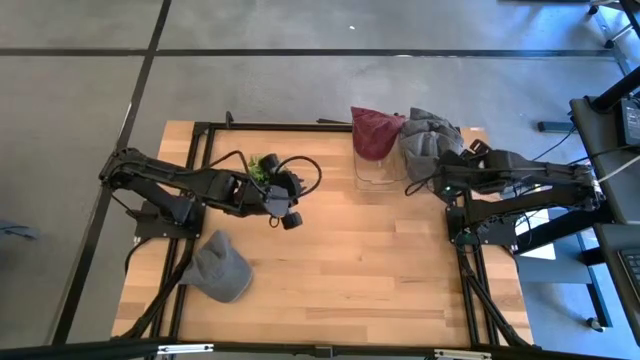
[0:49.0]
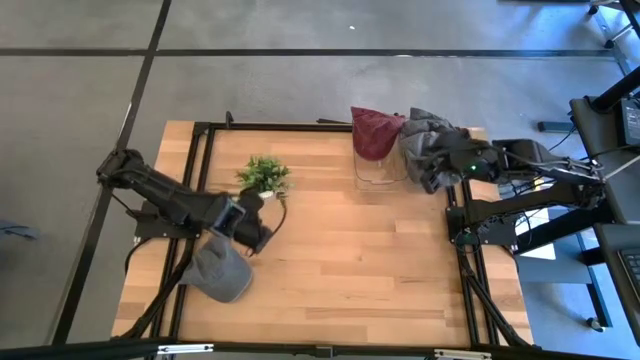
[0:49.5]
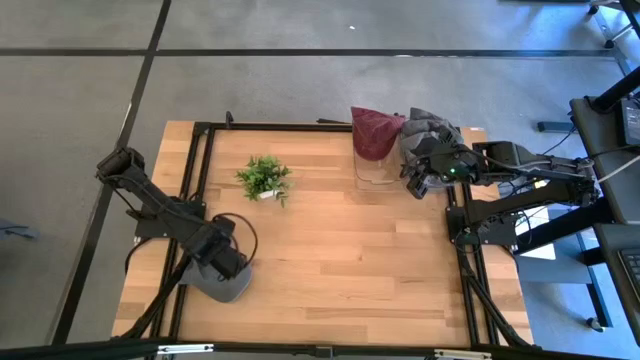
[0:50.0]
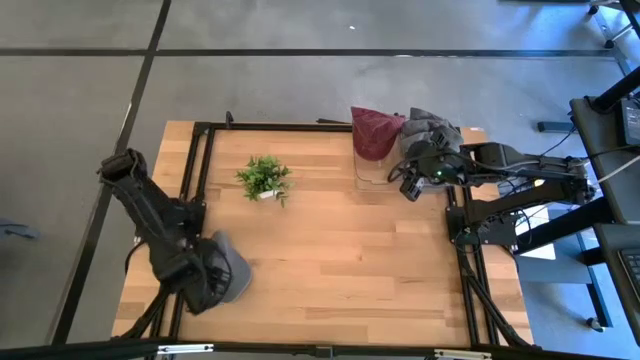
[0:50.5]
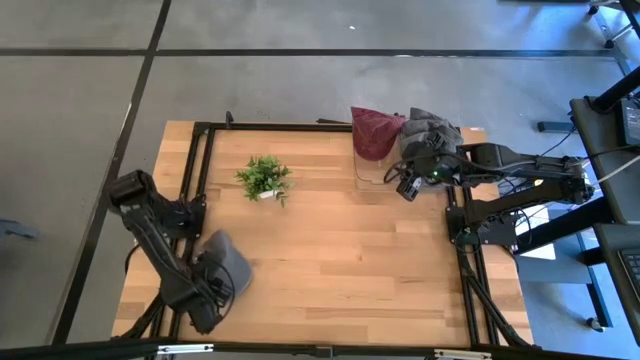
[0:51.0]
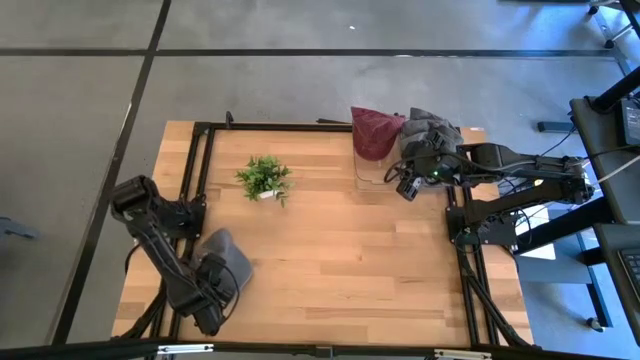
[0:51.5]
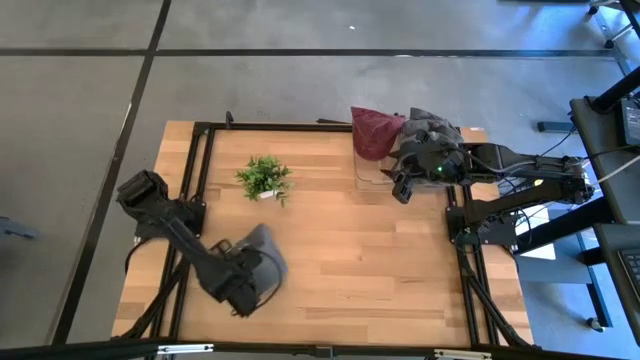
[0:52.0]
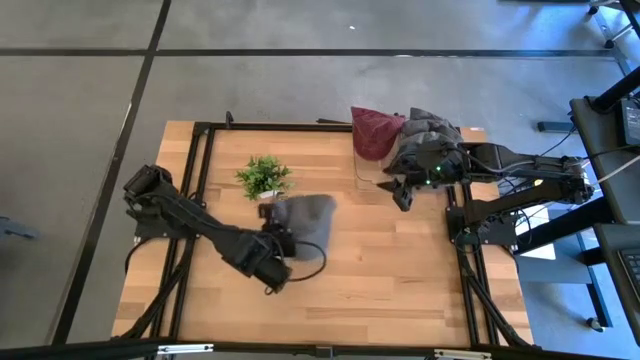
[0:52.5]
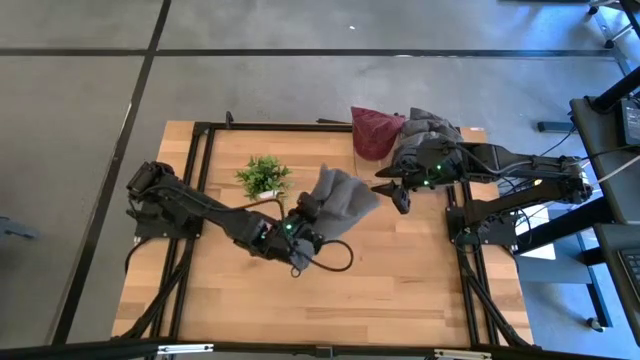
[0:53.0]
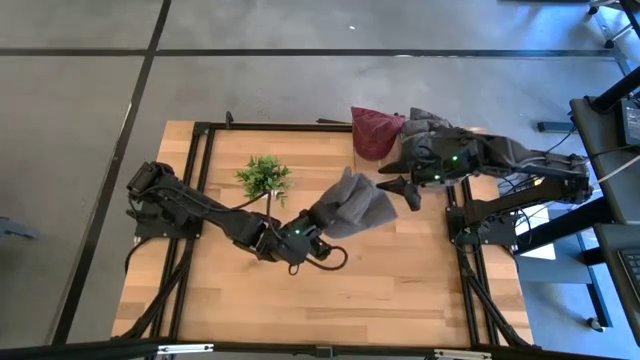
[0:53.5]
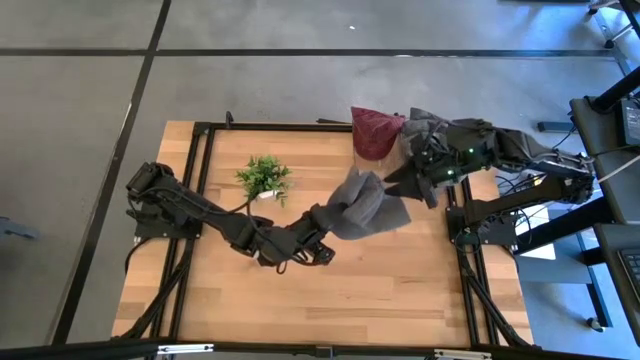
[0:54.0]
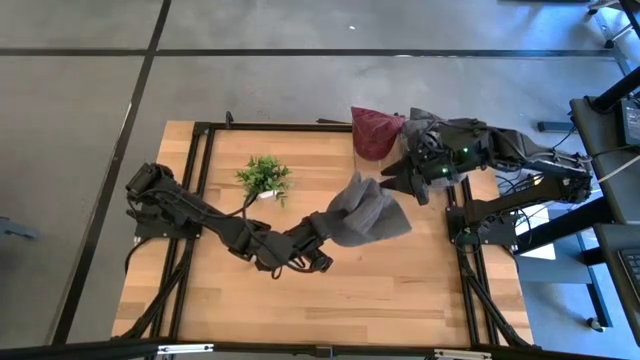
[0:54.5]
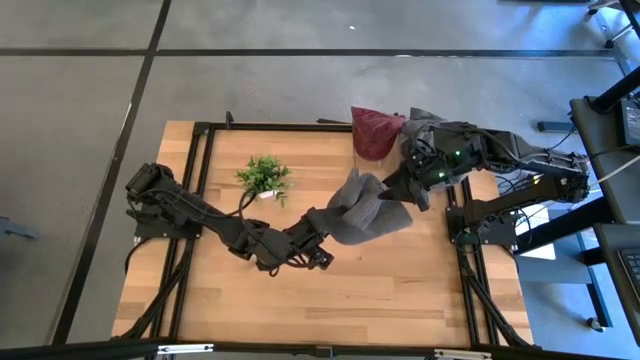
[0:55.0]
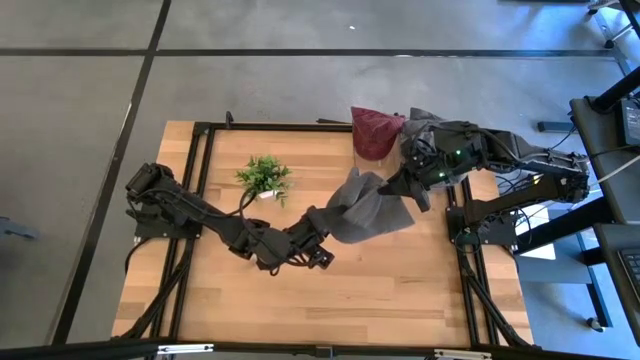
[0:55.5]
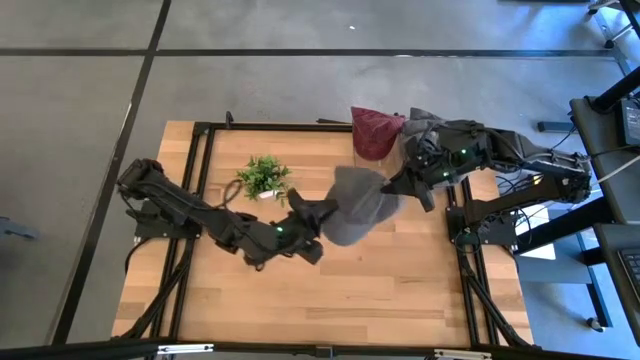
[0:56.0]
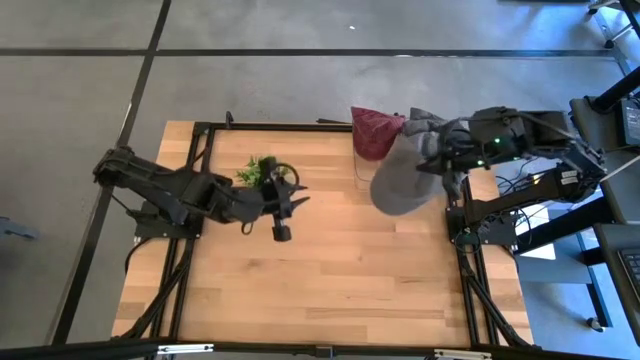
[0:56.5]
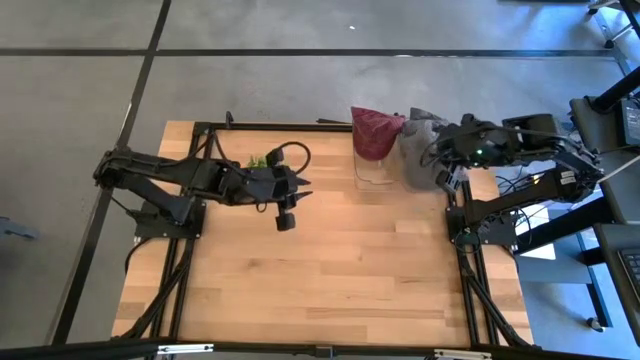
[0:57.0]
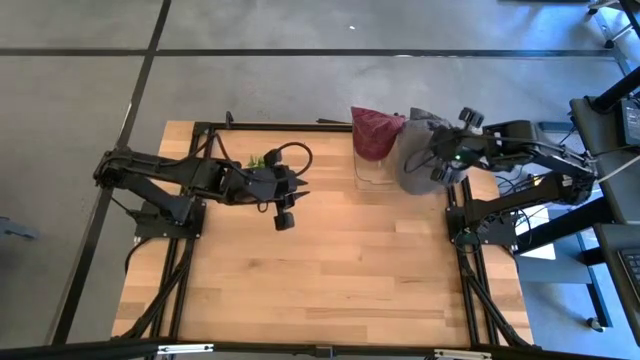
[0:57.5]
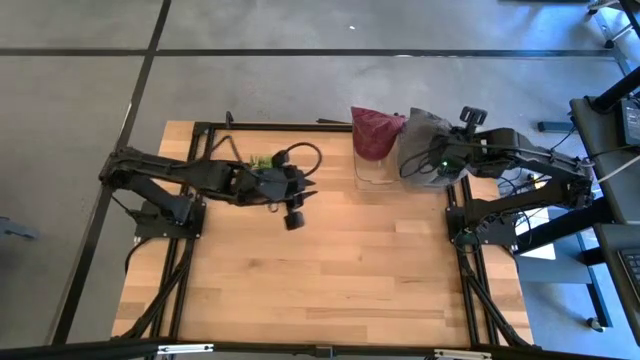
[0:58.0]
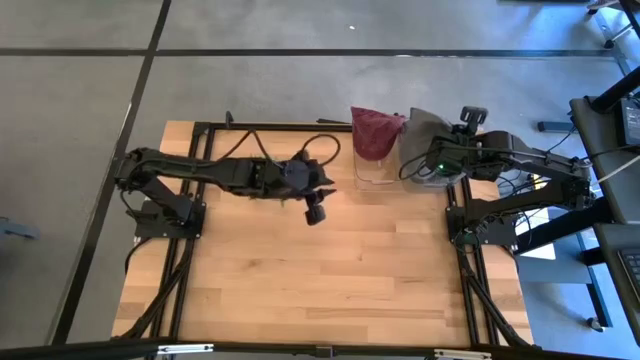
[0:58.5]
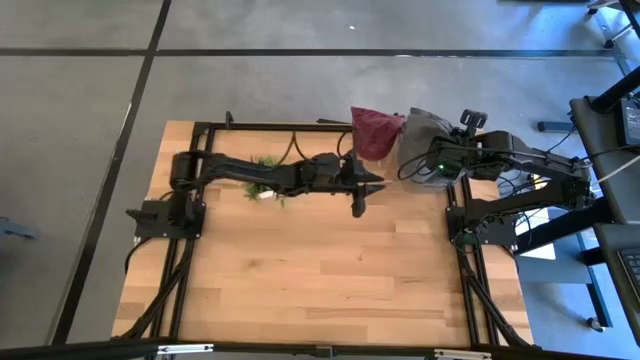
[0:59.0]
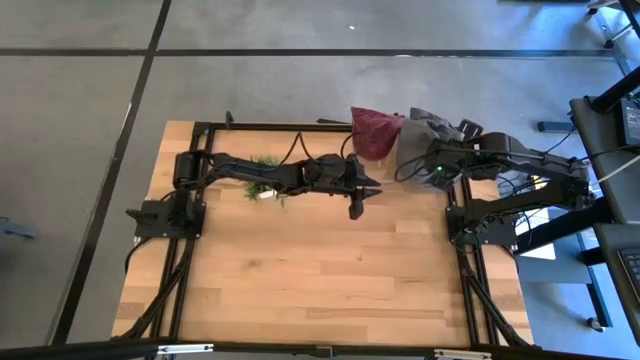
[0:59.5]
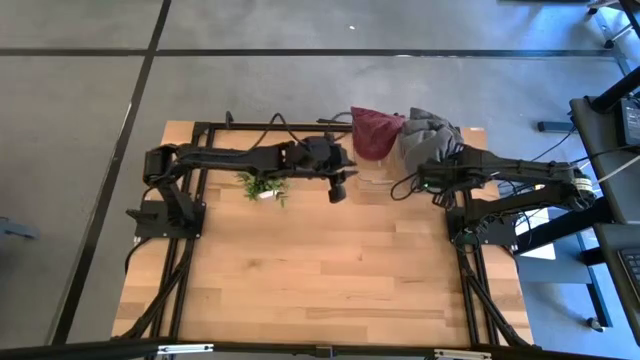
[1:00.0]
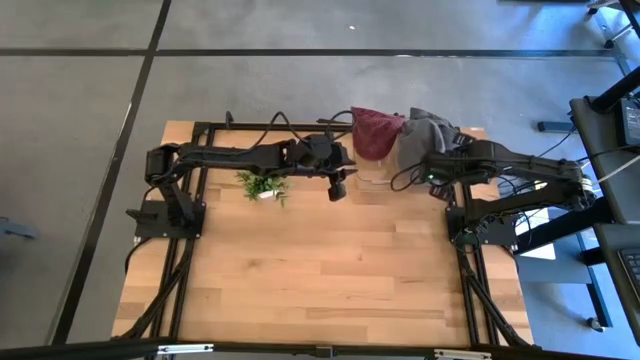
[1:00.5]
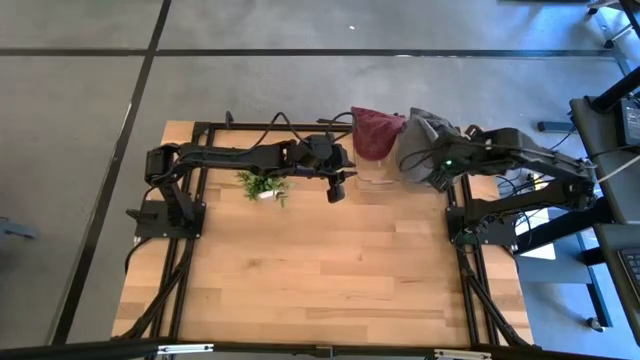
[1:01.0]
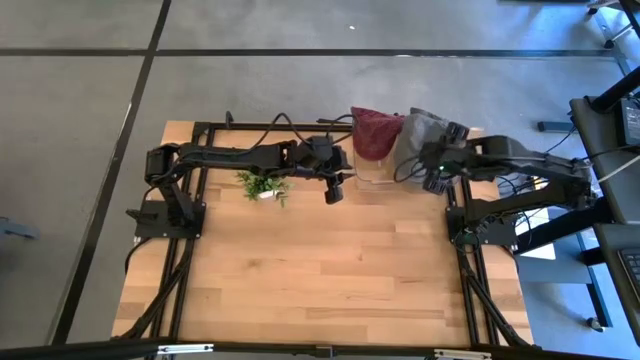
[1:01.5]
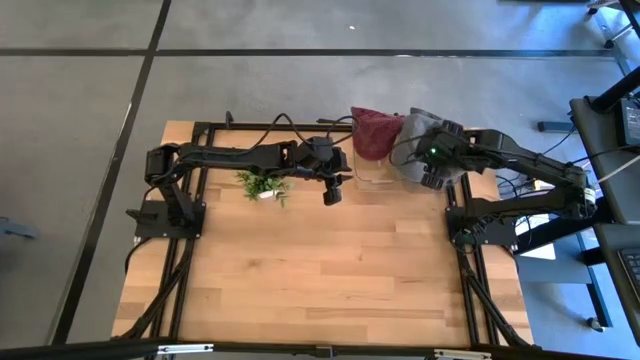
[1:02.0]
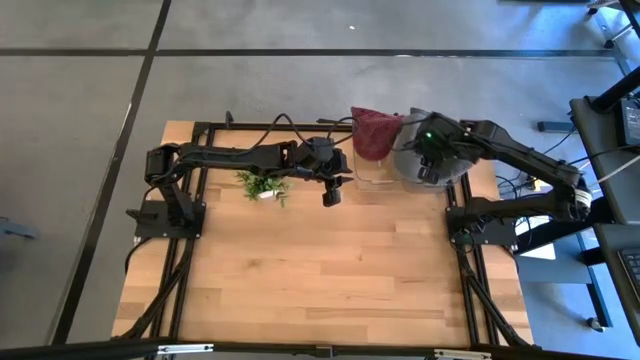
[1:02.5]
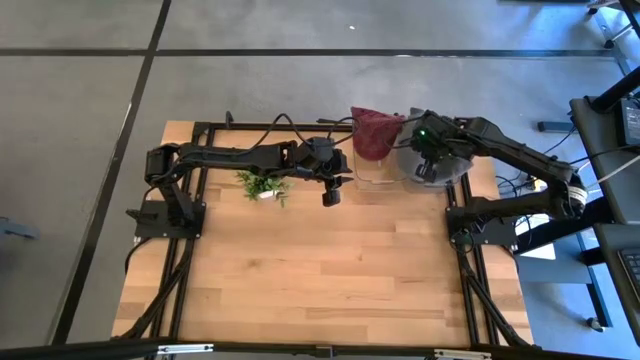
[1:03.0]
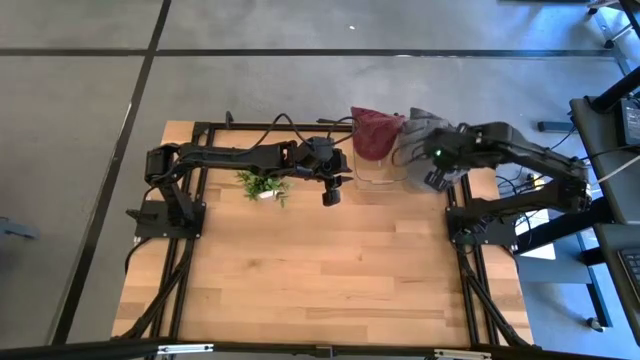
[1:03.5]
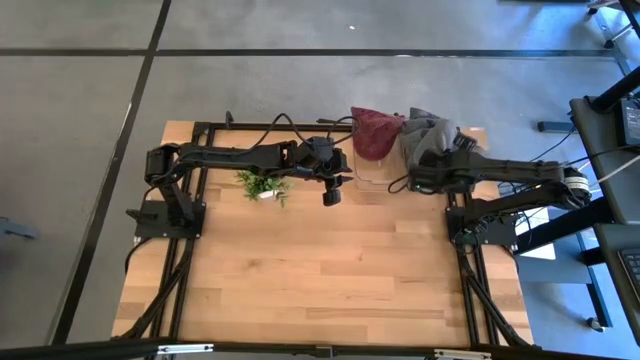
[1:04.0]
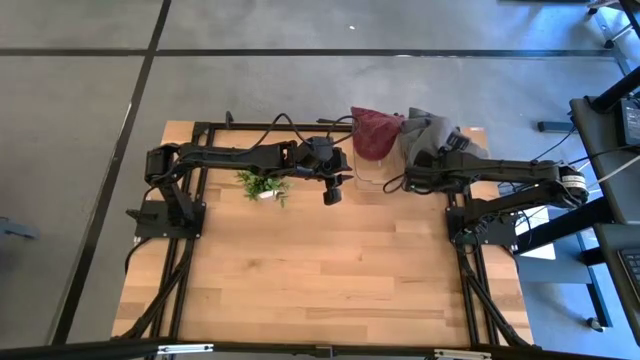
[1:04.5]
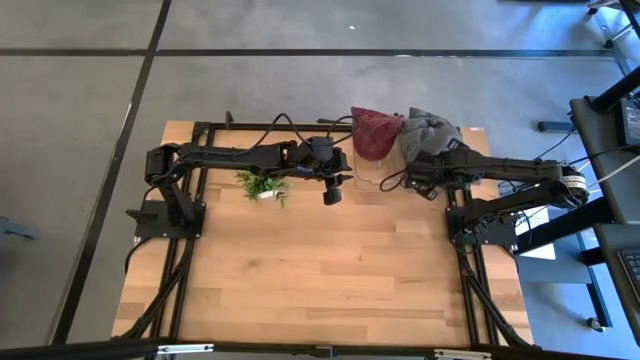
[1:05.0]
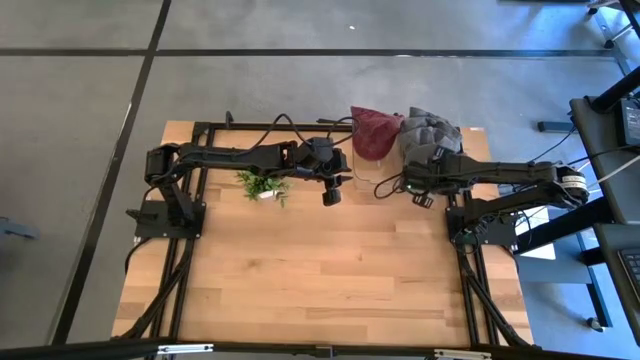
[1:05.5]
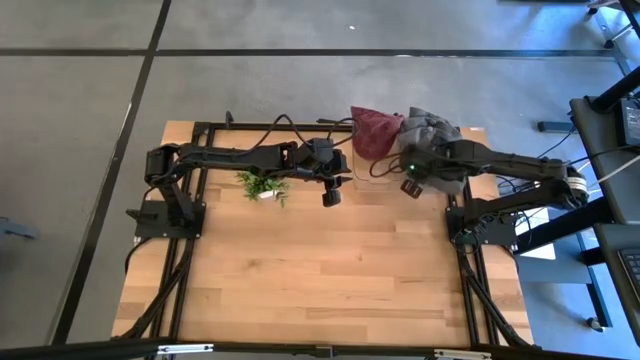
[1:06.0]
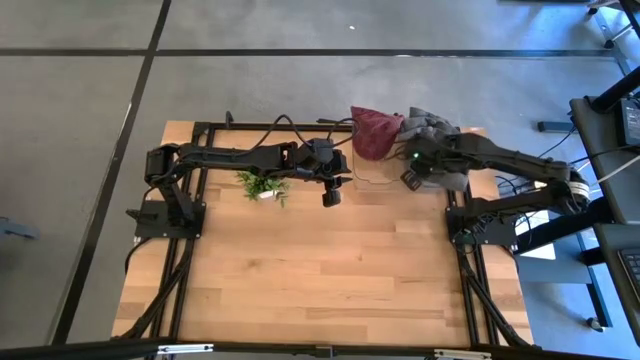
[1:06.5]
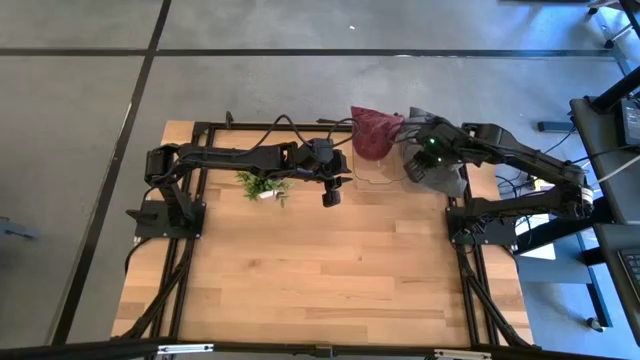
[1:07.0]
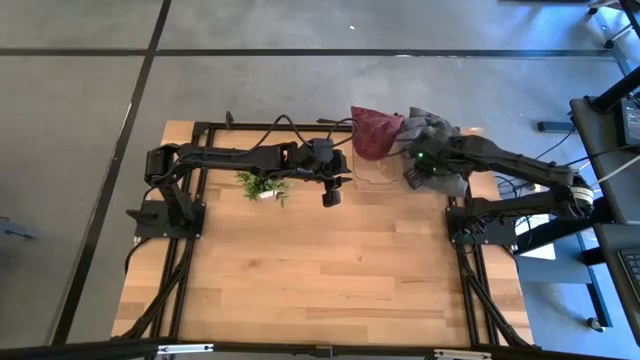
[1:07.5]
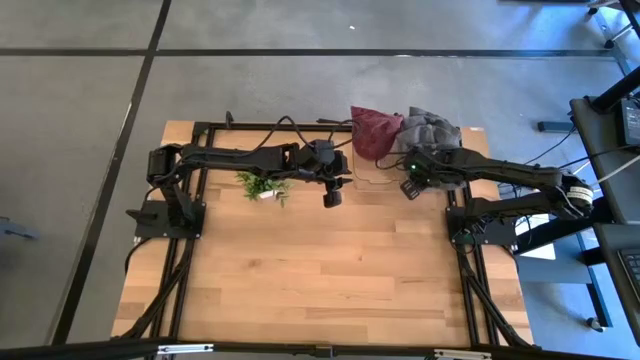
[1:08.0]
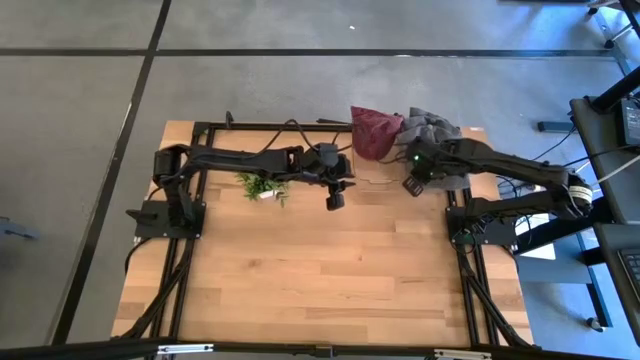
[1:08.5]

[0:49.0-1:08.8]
Task: Pick & Place hat
Put the gray cap into the right transparent bin
